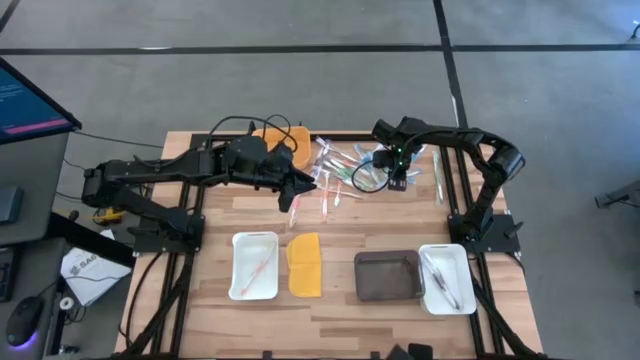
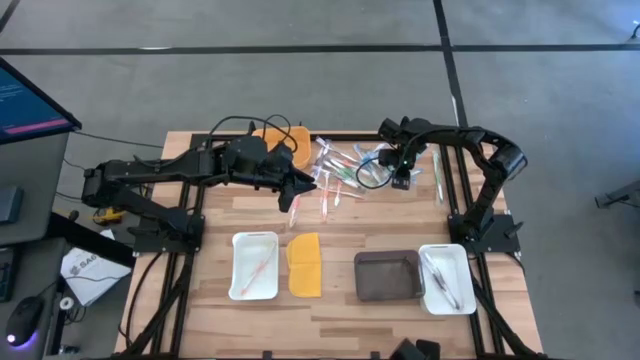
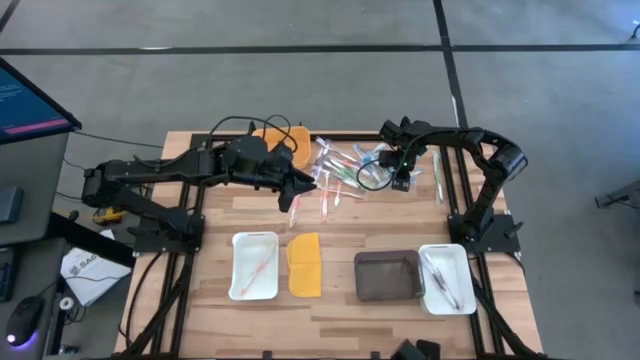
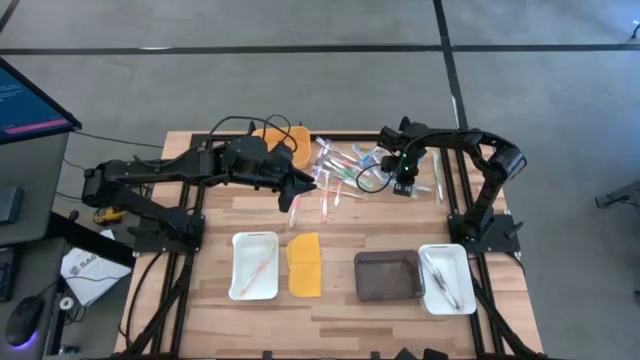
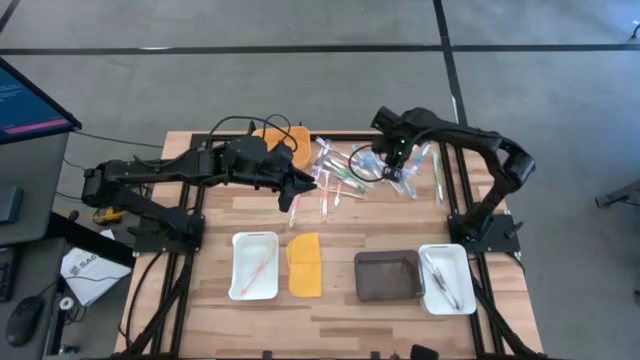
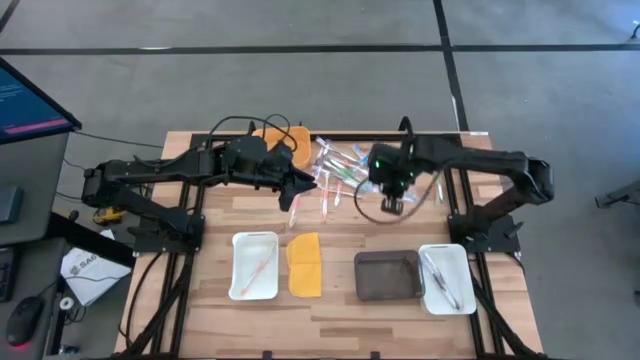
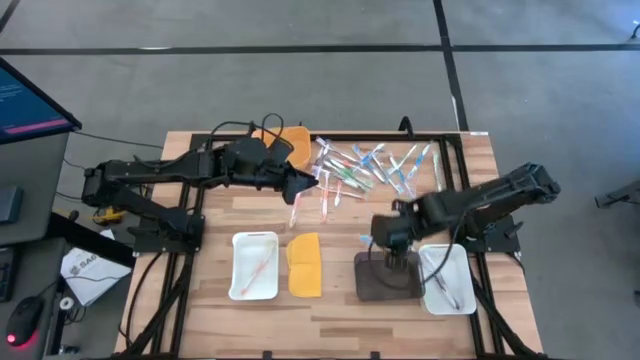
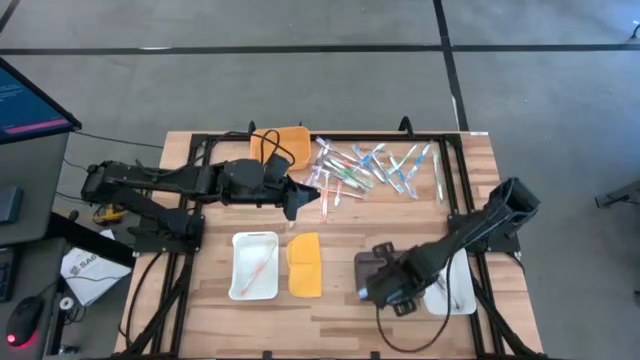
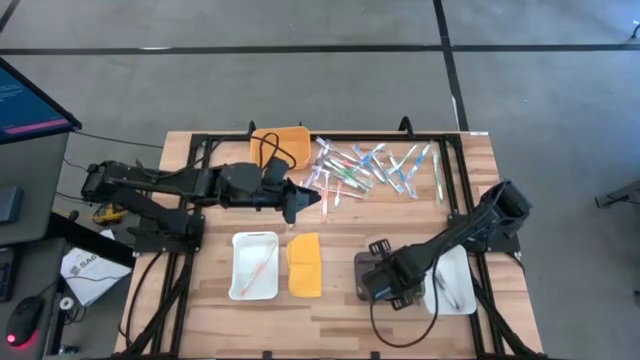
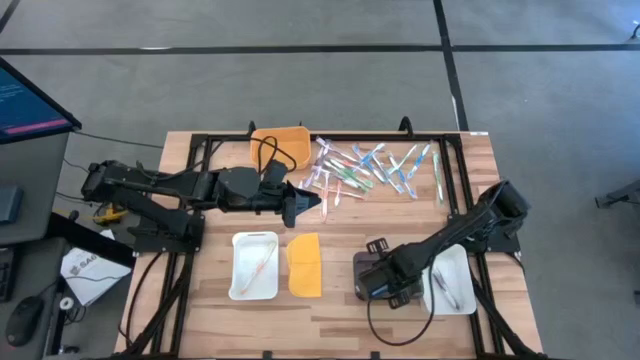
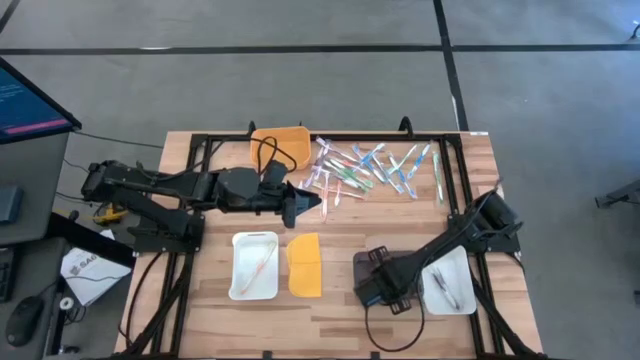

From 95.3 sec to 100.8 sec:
Task: Pick & Place Toothbrushes
Put the blue toothbrush into the black bin

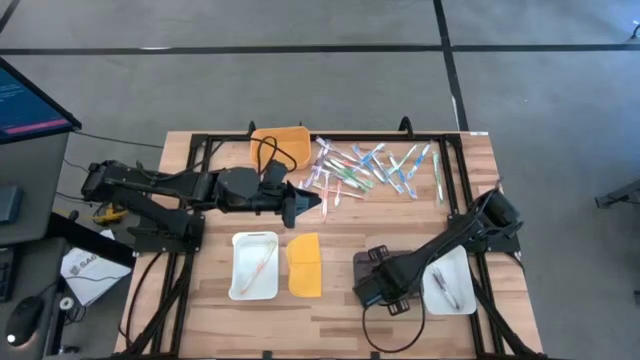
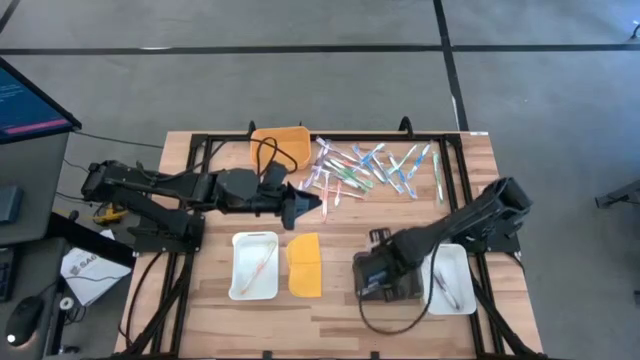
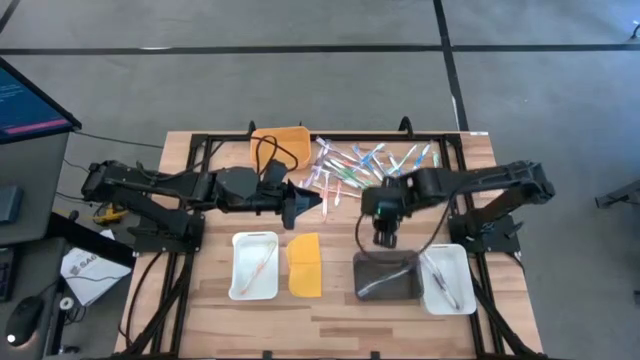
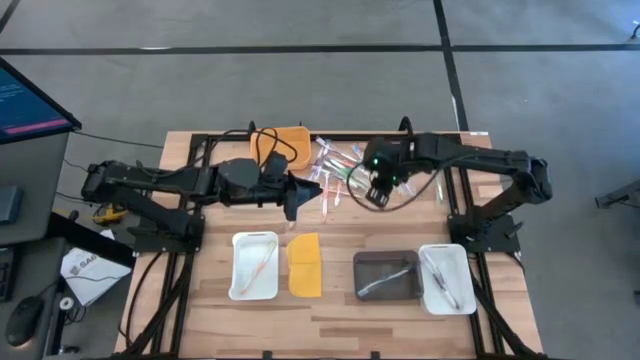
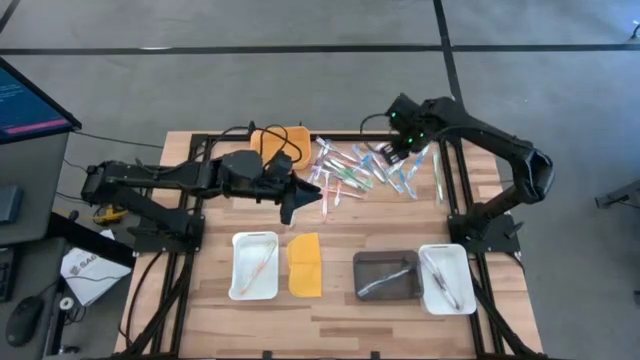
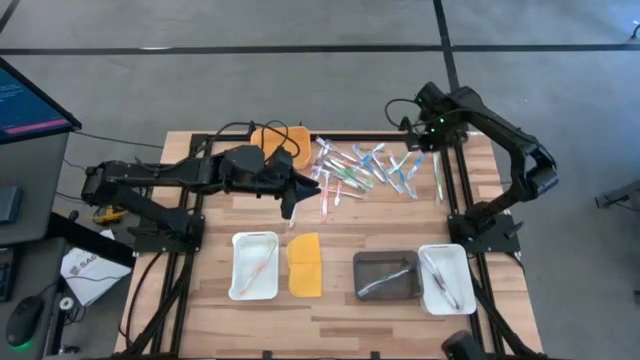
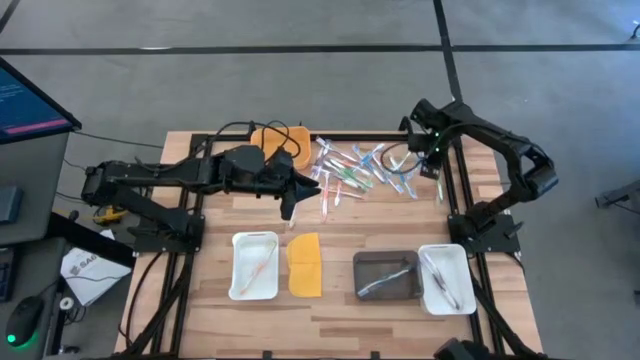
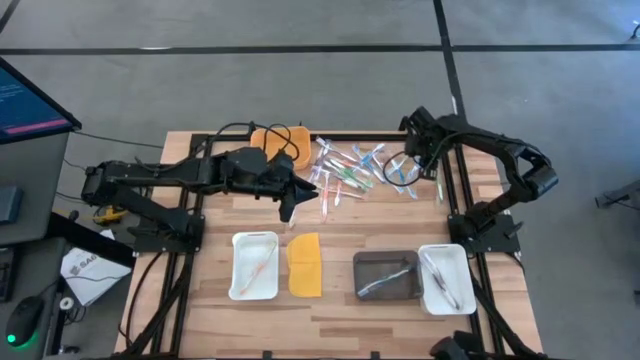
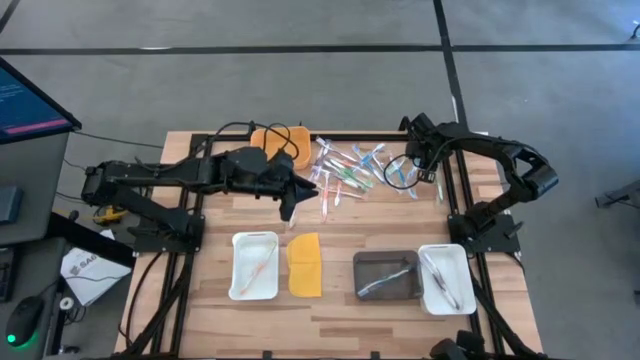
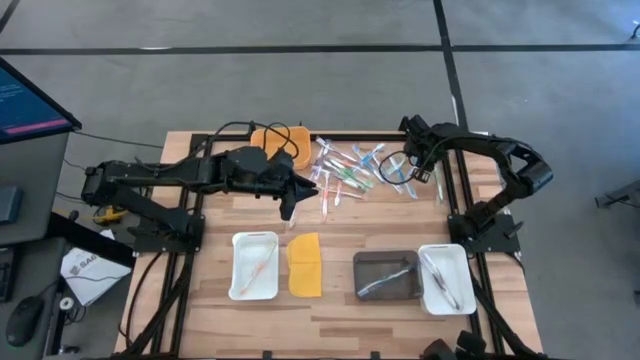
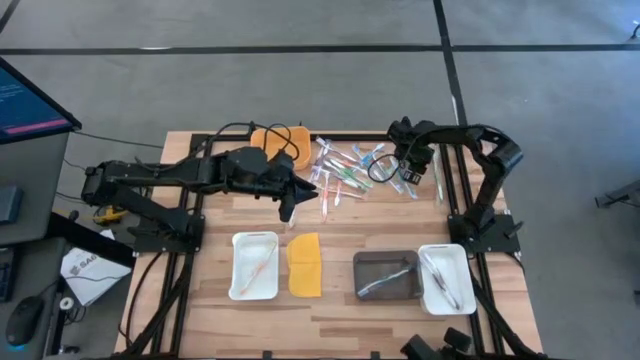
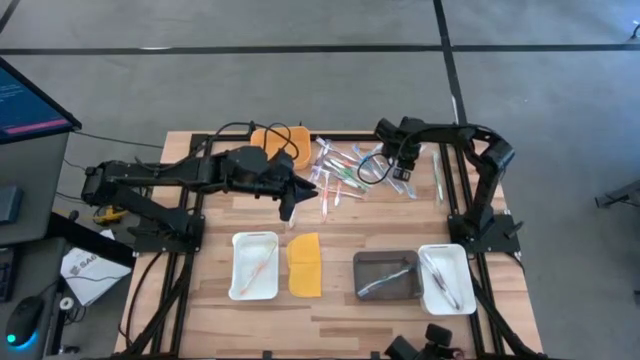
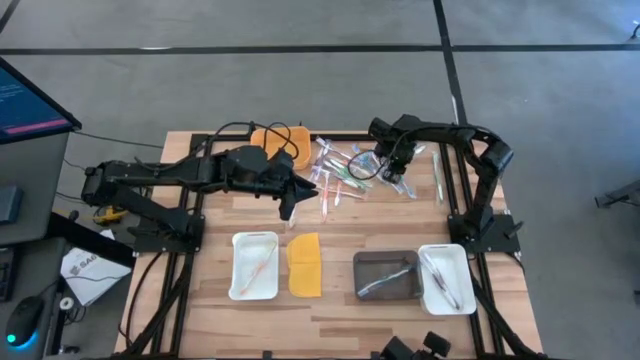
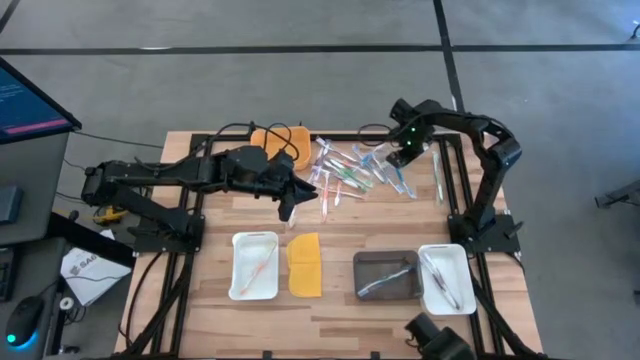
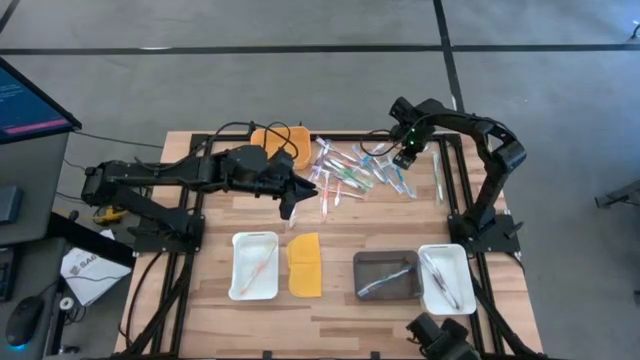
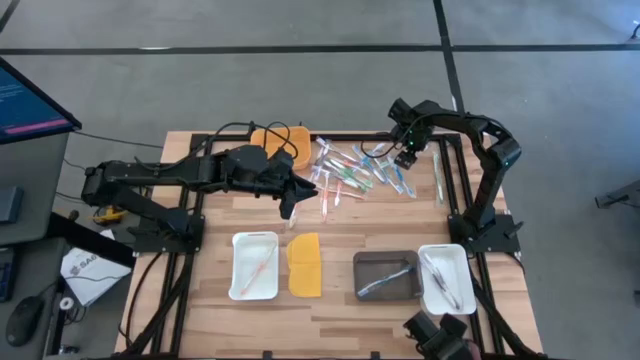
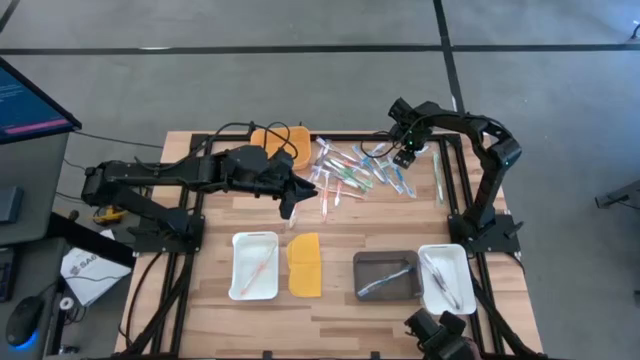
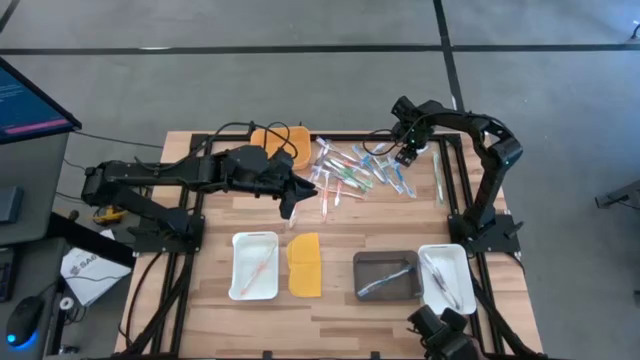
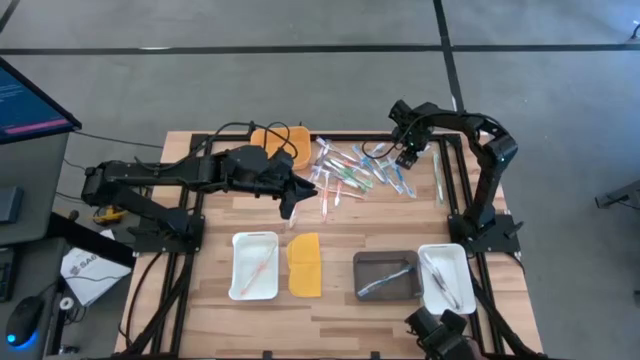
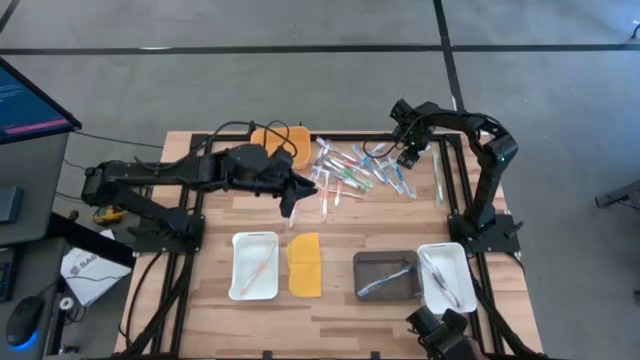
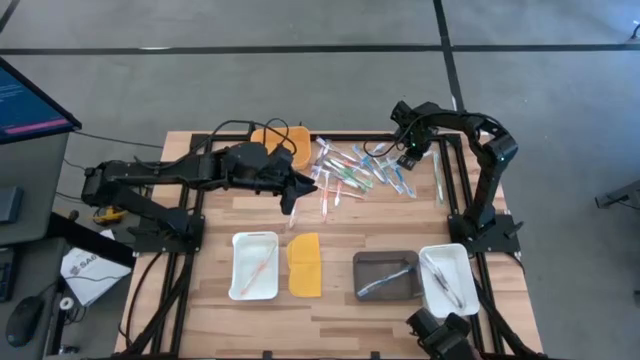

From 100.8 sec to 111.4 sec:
Put the blue toothbrush into the black bin

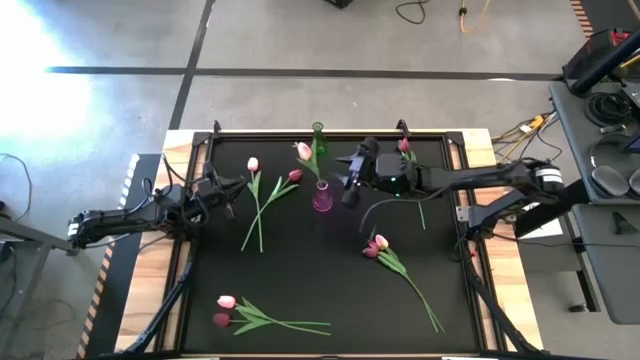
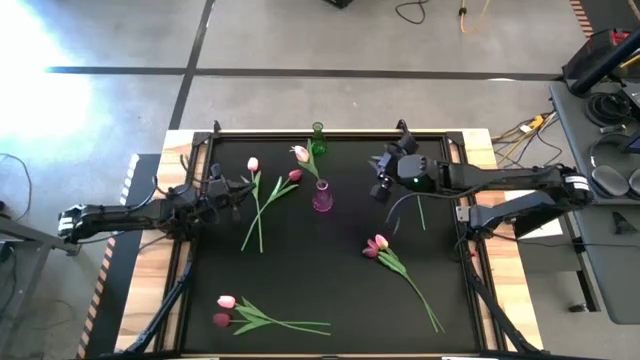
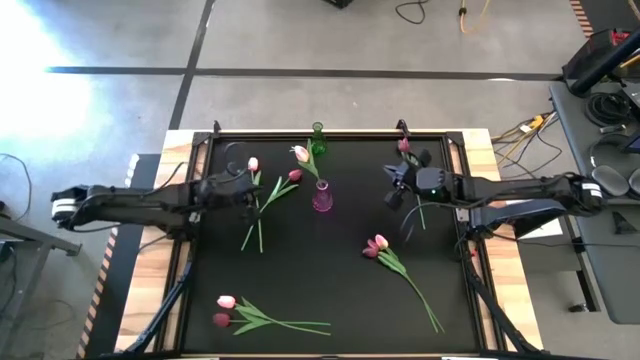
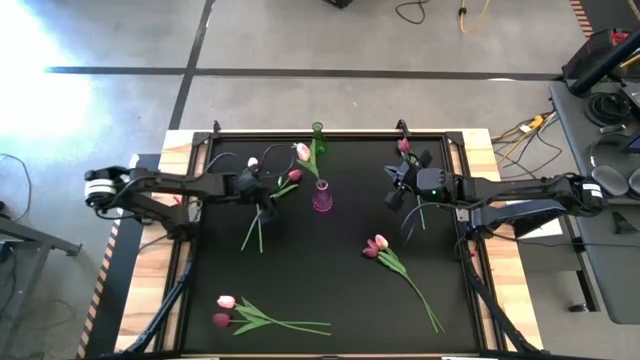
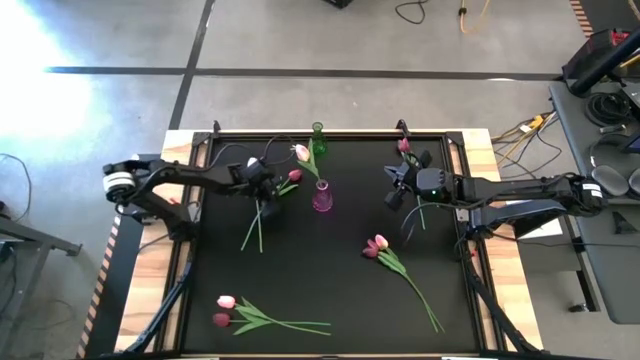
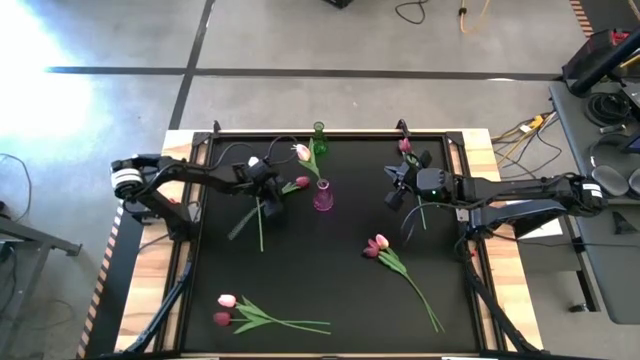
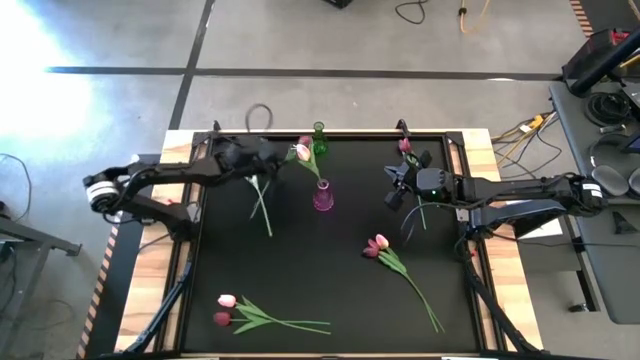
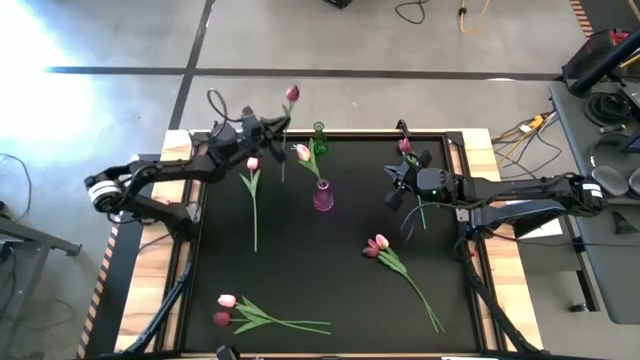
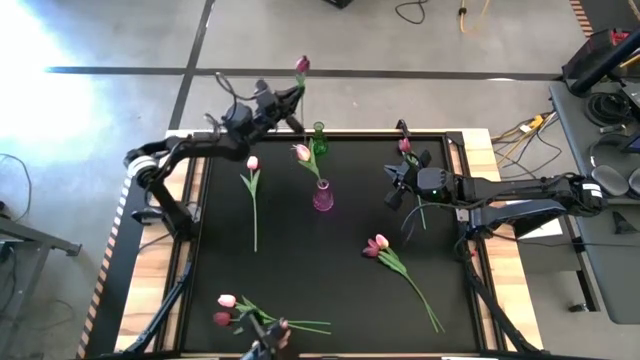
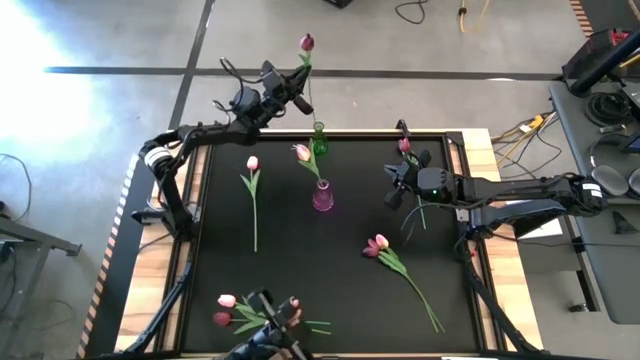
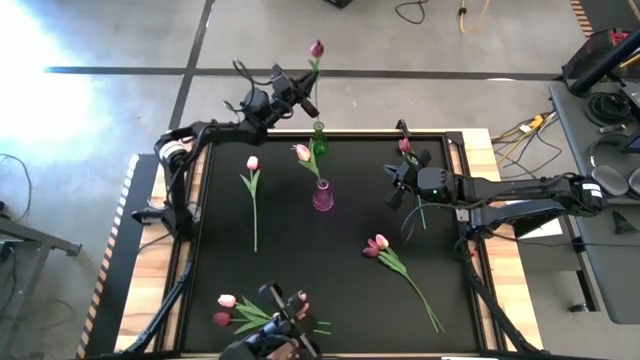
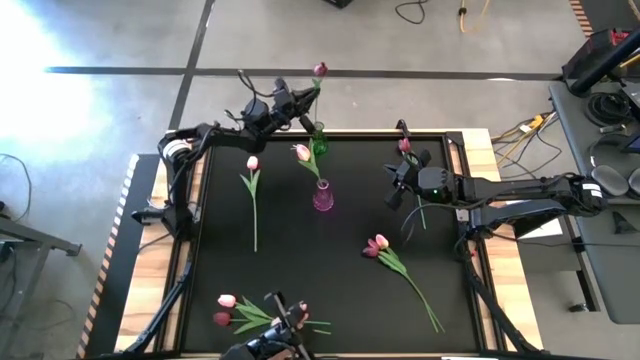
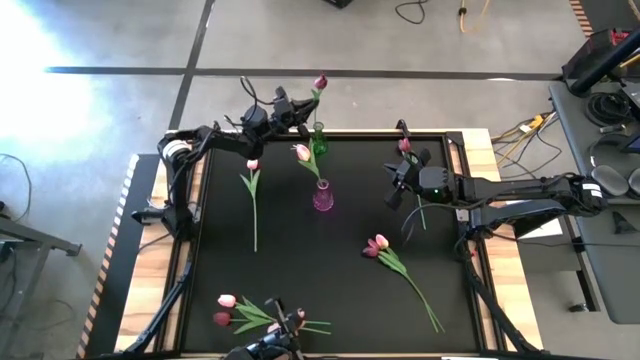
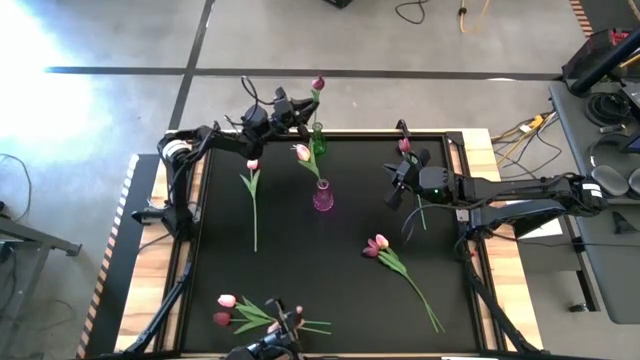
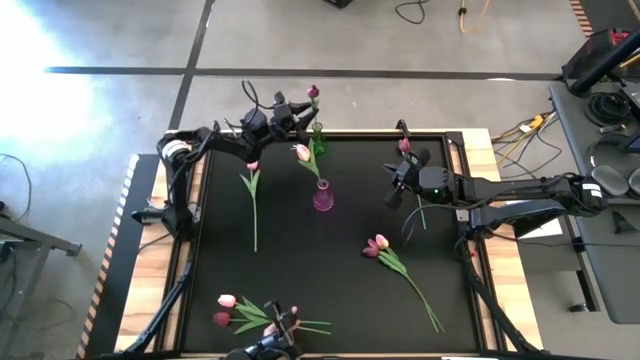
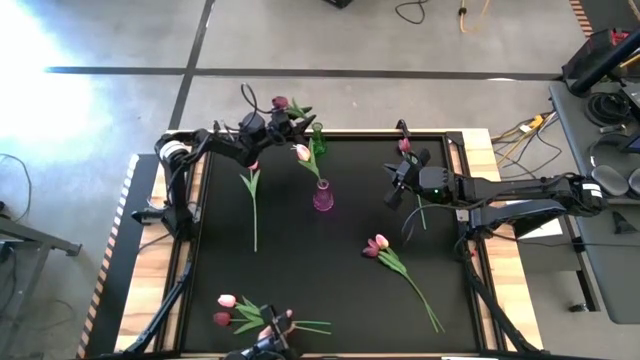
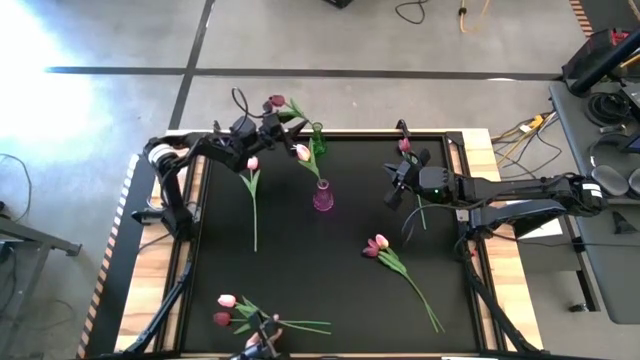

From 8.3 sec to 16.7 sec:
Task: Sort flowers into vase by color
Put the red flower into the green vase
